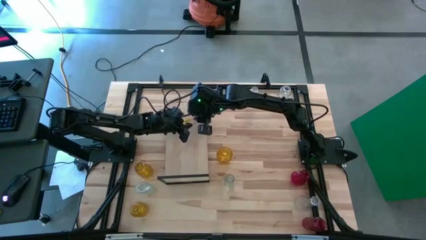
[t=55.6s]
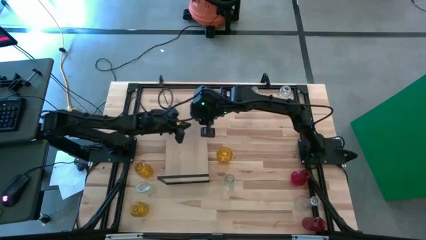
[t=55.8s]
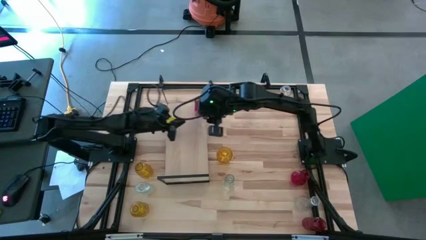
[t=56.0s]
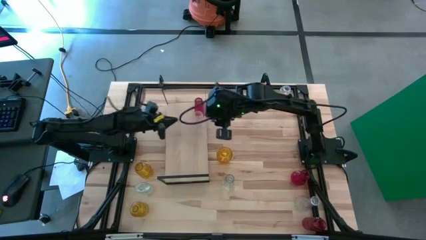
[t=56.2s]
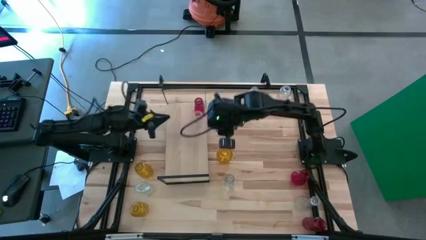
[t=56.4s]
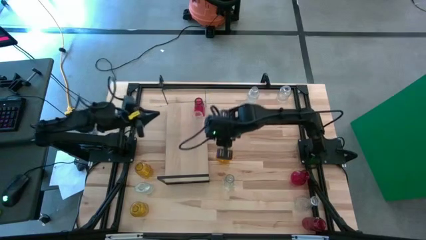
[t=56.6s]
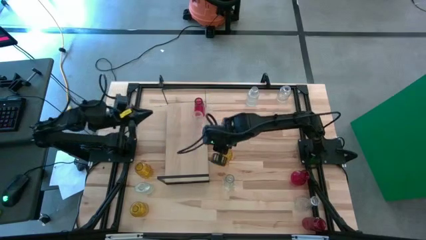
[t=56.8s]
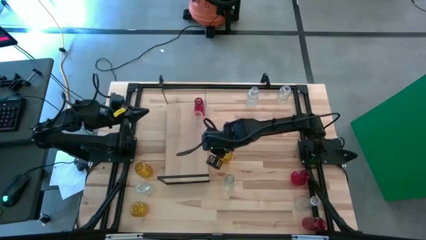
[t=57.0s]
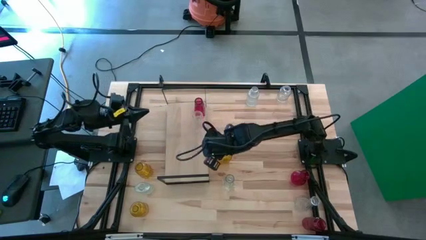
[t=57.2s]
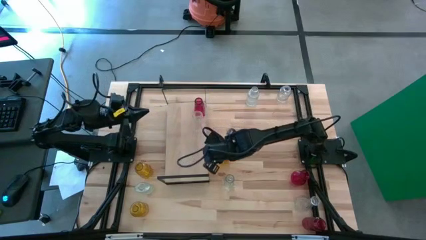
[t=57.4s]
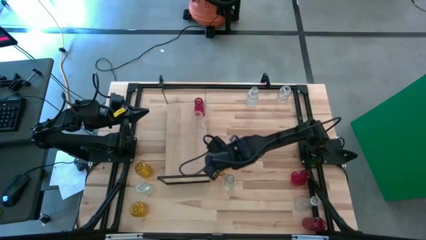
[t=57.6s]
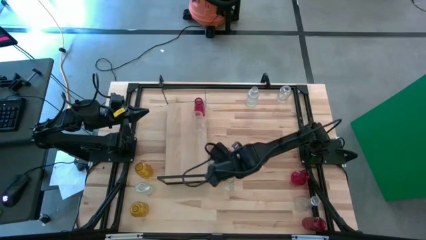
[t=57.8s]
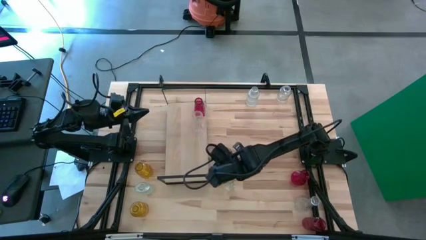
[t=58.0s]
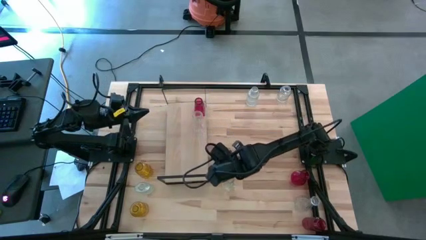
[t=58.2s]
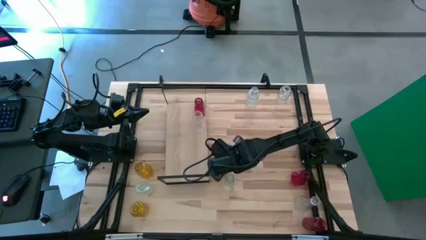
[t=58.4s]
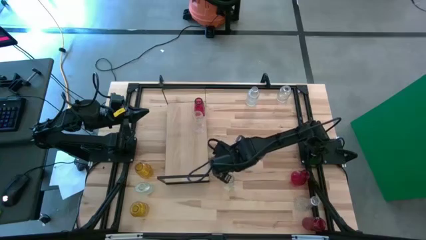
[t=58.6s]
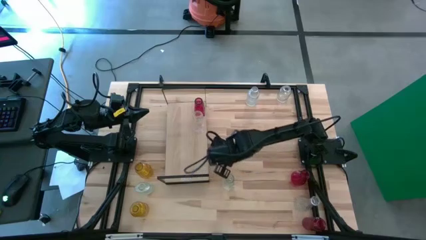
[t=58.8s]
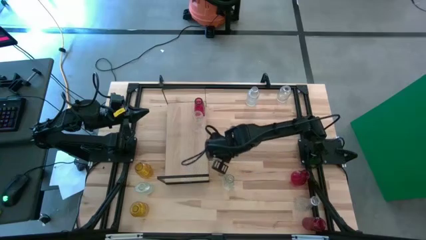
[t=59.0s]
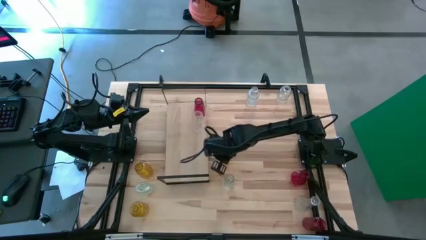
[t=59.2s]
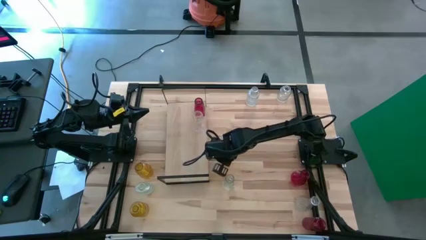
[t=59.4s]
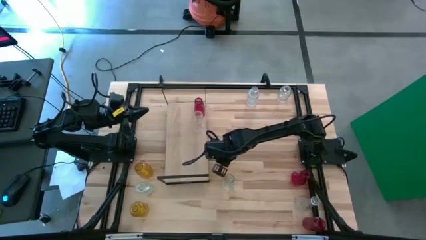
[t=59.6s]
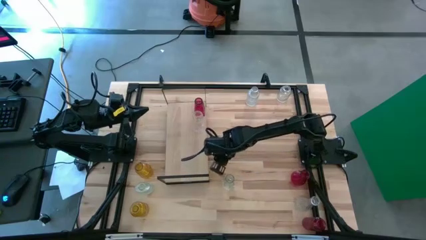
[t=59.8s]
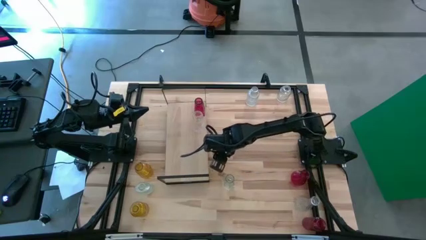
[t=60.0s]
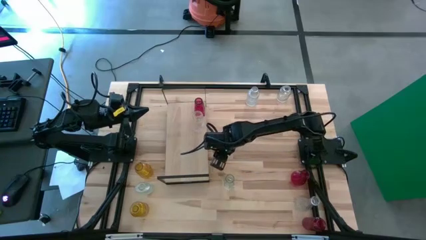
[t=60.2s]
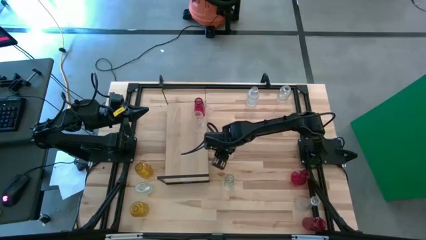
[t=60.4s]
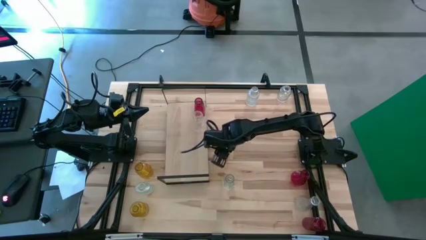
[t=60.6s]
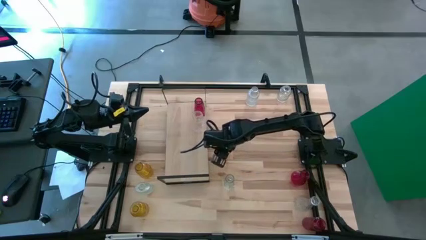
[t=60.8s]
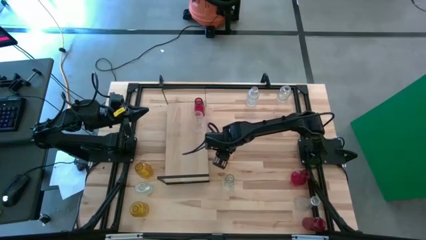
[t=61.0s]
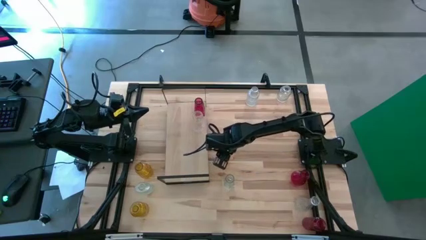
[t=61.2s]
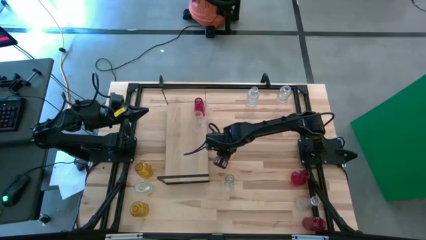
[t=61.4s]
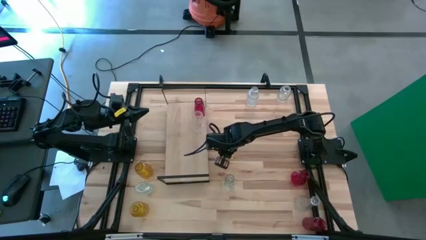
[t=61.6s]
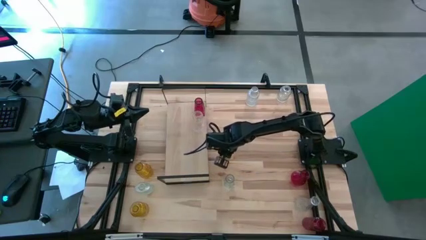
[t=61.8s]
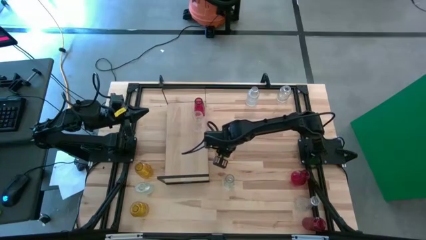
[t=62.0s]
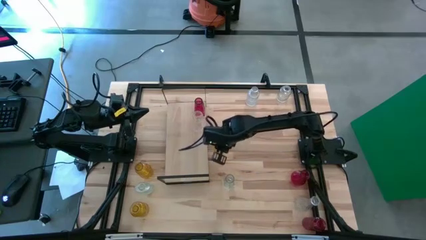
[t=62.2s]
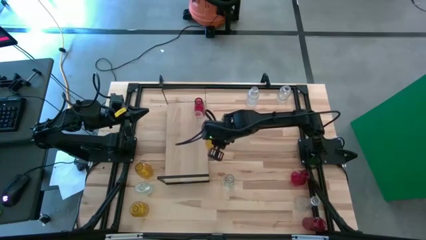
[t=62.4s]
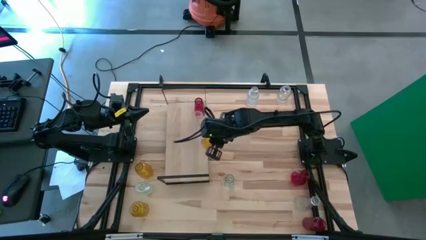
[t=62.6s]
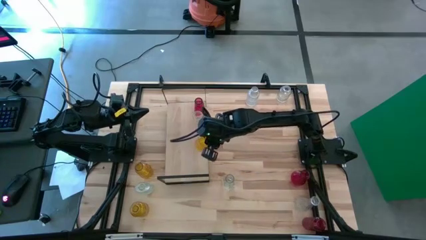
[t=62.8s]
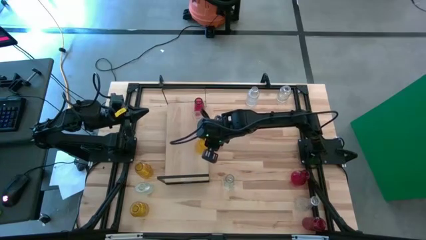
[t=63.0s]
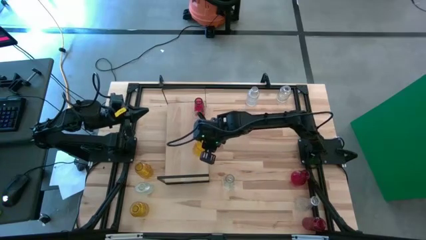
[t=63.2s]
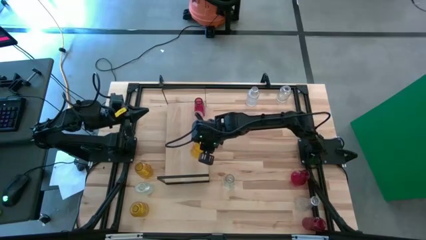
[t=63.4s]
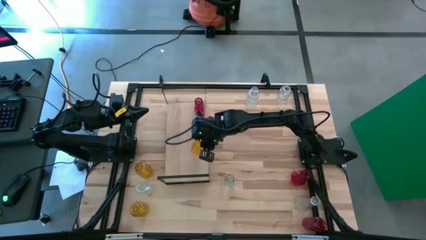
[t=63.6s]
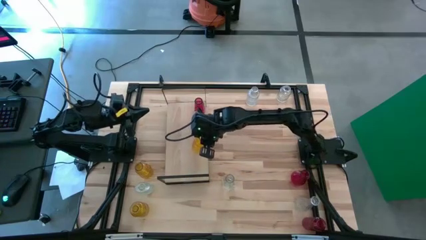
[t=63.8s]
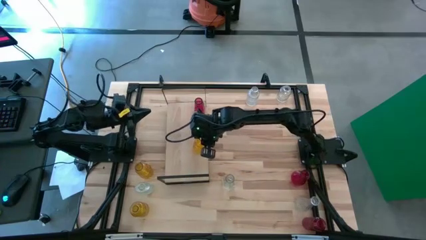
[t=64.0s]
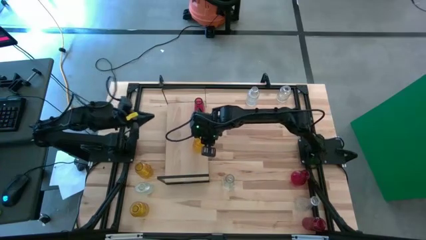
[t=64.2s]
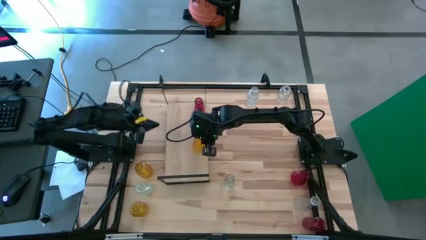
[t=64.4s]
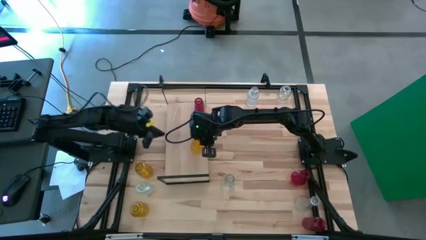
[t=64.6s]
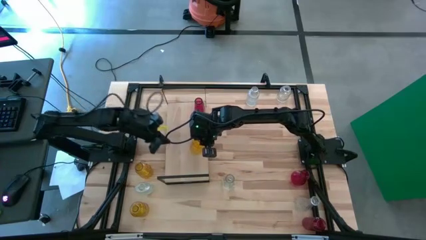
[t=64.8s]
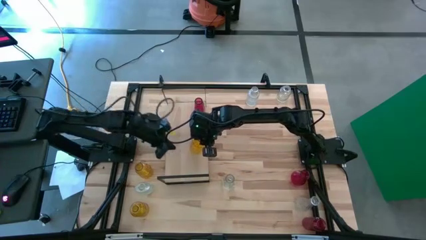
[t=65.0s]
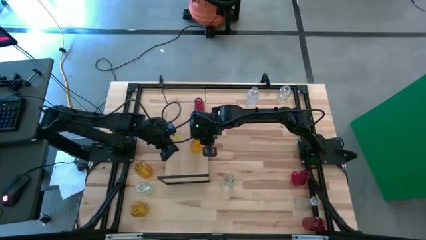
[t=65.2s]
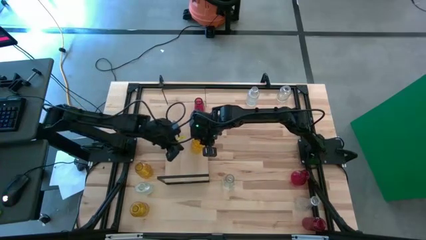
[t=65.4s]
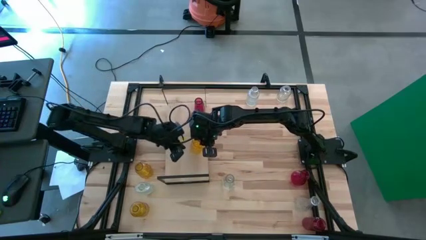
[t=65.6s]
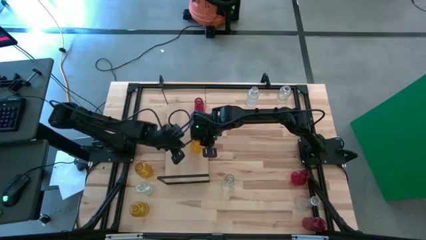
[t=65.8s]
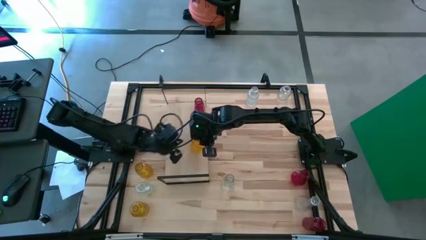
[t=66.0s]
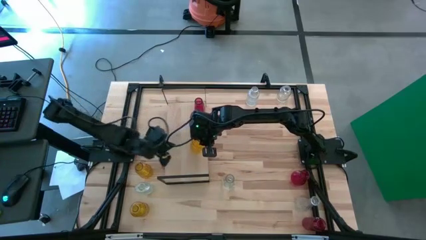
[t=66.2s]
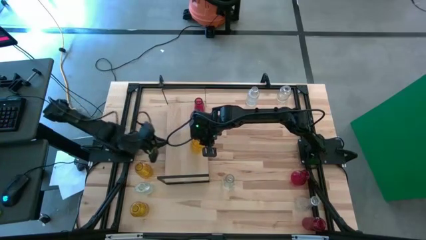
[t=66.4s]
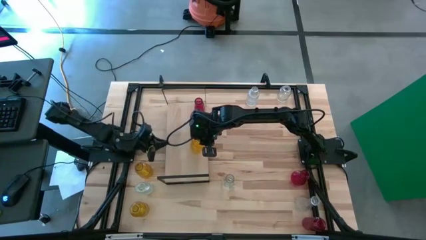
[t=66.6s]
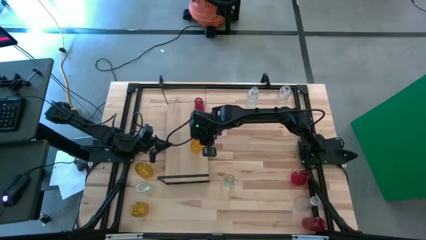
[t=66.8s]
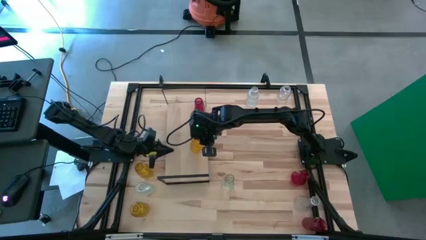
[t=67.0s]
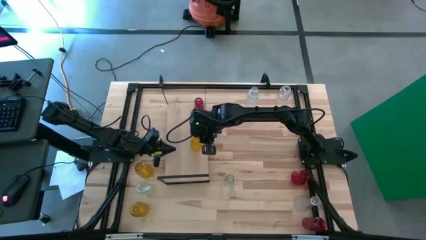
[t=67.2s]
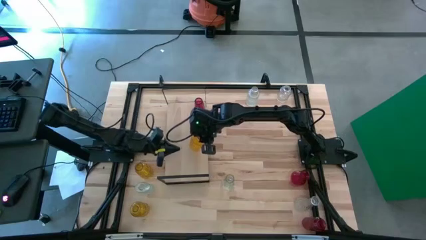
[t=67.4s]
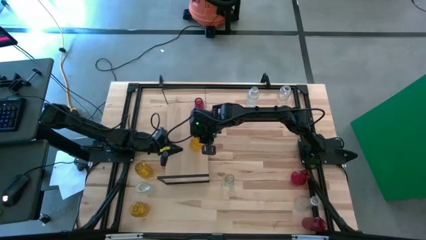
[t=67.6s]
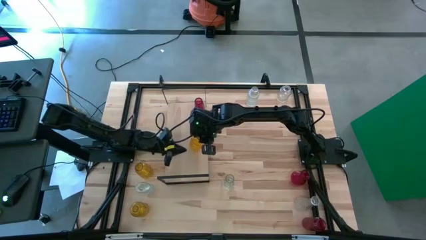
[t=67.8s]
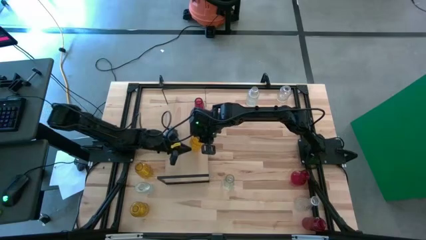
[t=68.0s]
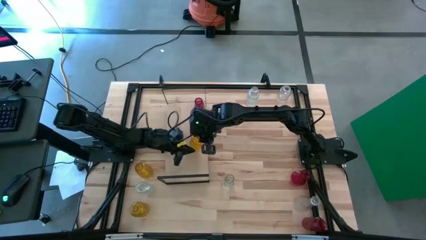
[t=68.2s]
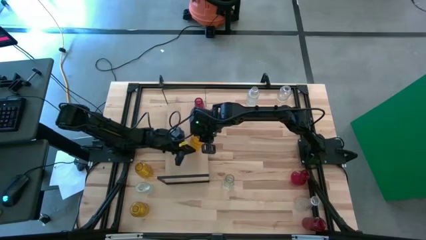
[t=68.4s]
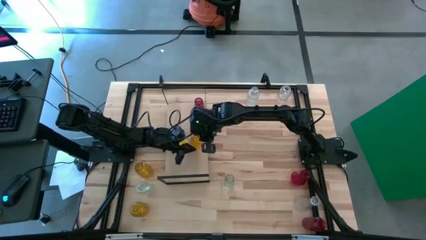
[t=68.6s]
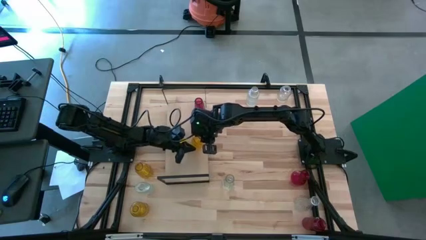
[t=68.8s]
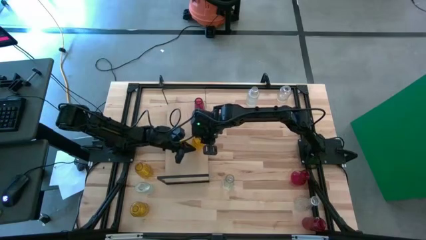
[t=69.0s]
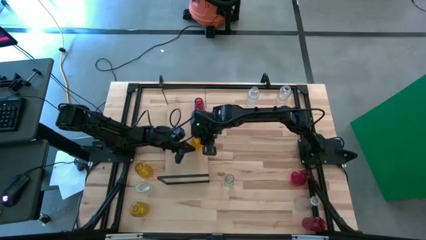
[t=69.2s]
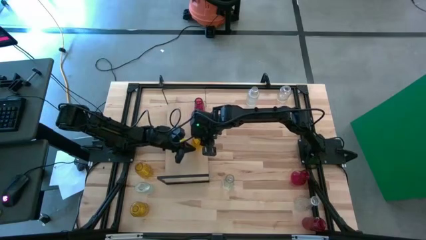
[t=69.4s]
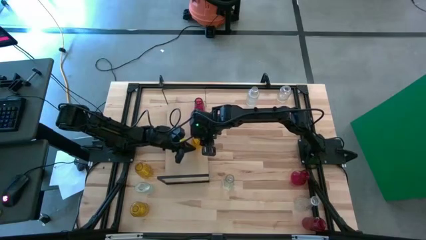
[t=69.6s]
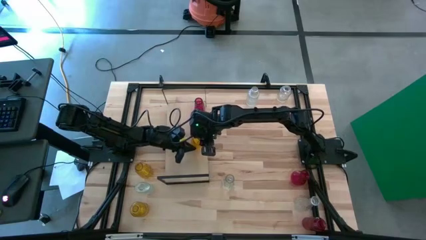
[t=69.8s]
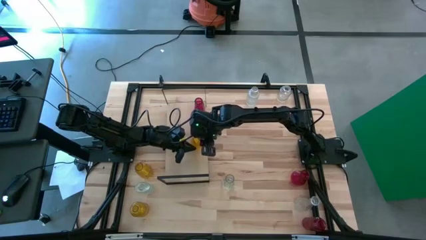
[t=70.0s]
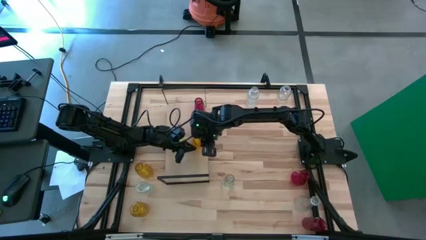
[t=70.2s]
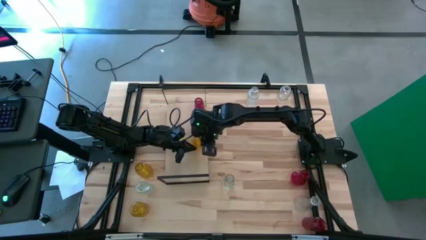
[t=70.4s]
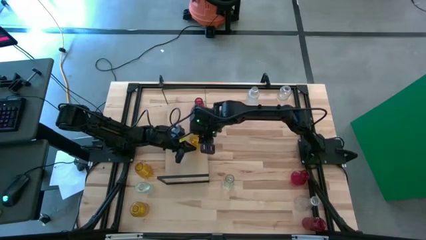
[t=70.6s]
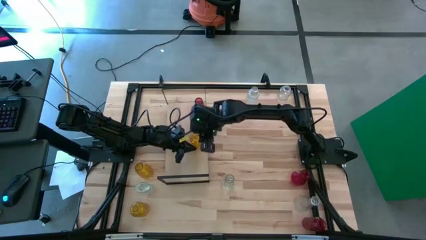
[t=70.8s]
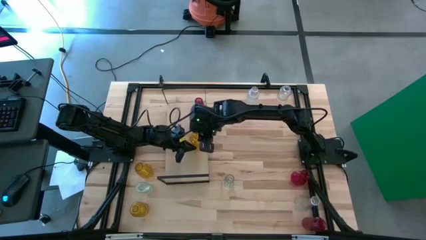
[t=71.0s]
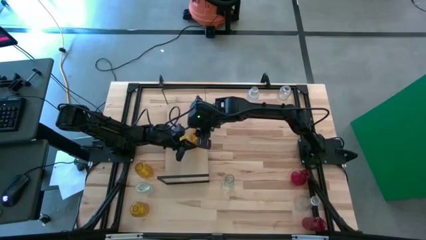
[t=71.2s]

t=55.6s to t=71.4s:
Task: sort vases onto shelf
Put the top right yellow vase on the shelf
